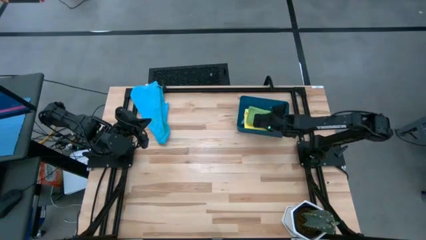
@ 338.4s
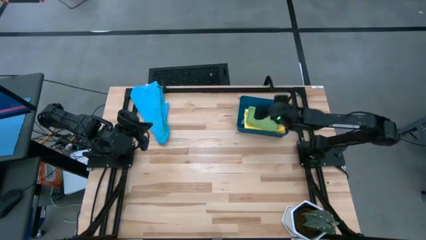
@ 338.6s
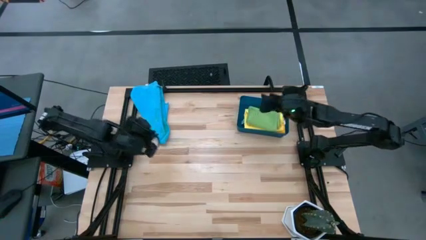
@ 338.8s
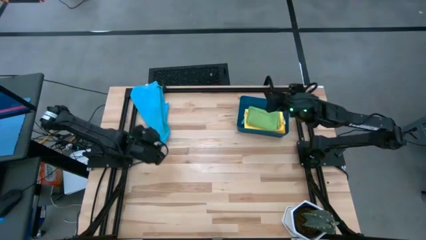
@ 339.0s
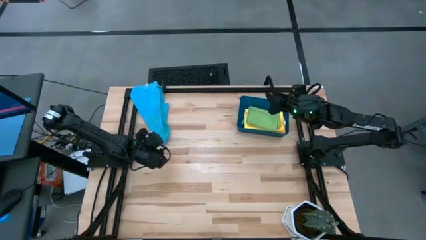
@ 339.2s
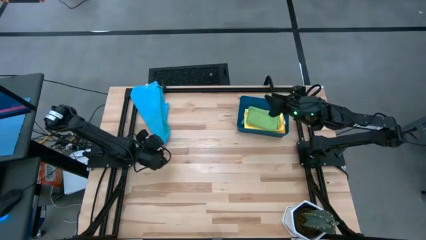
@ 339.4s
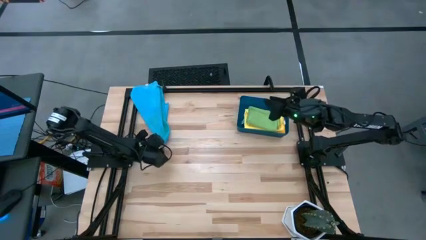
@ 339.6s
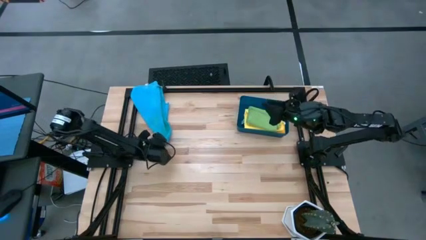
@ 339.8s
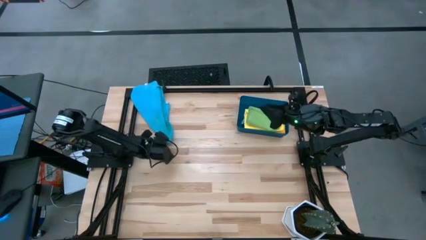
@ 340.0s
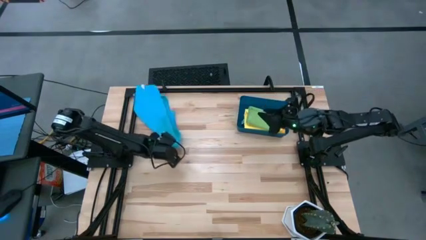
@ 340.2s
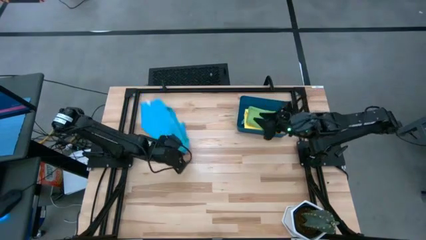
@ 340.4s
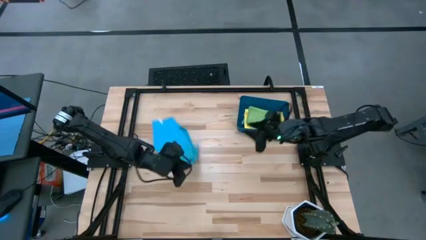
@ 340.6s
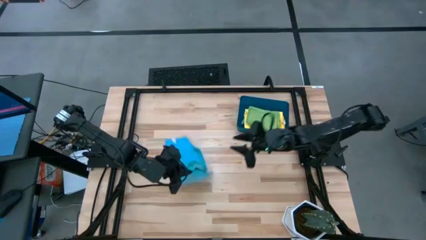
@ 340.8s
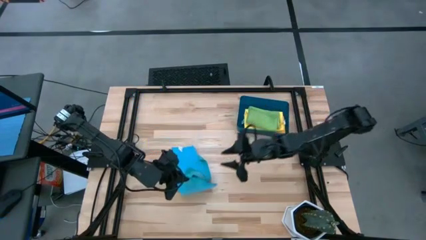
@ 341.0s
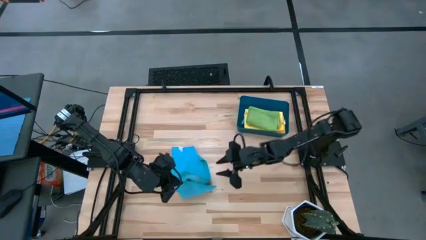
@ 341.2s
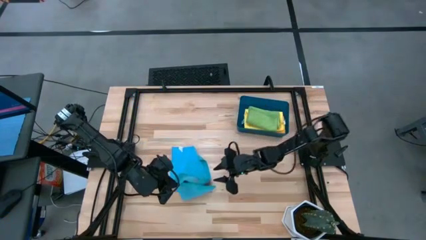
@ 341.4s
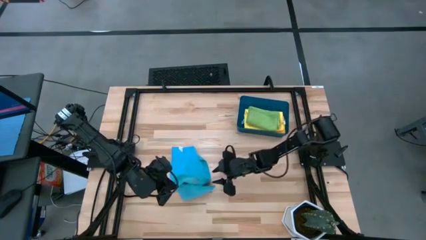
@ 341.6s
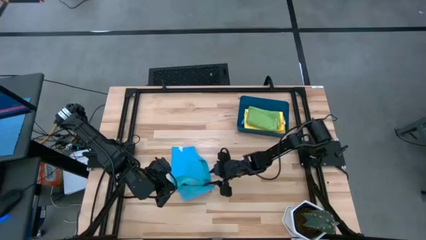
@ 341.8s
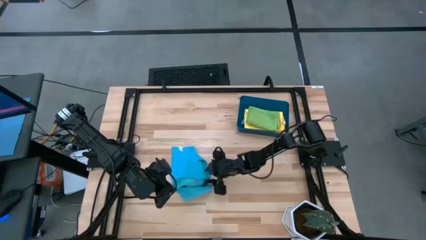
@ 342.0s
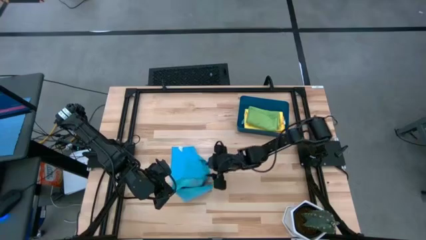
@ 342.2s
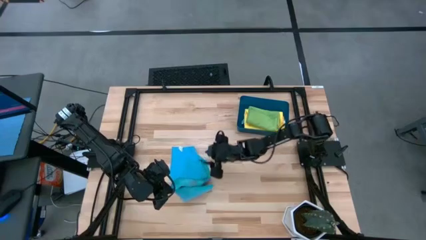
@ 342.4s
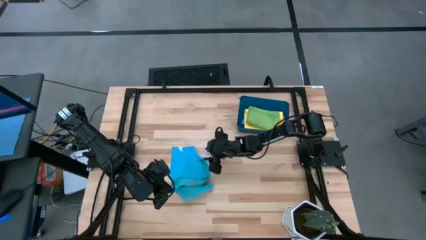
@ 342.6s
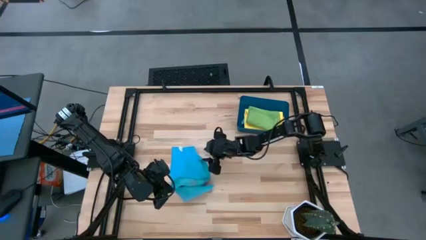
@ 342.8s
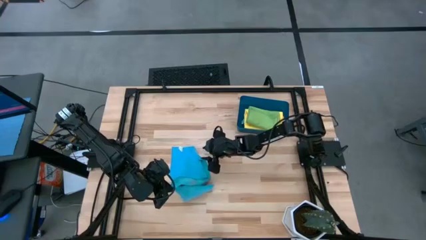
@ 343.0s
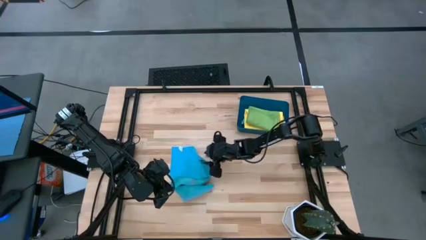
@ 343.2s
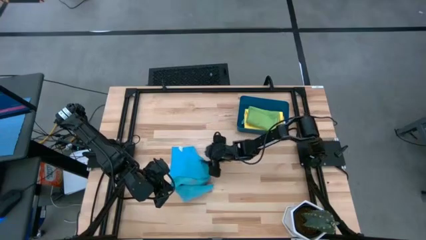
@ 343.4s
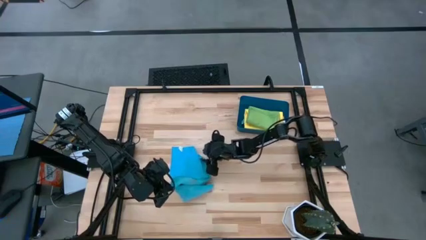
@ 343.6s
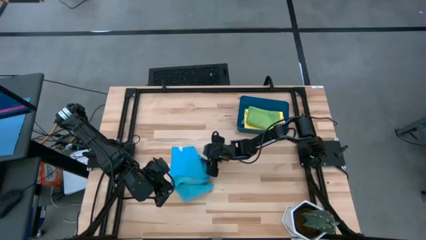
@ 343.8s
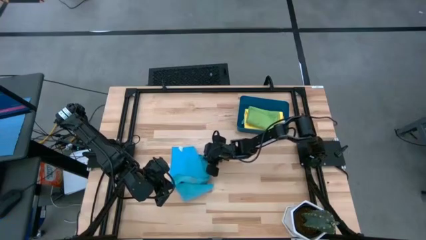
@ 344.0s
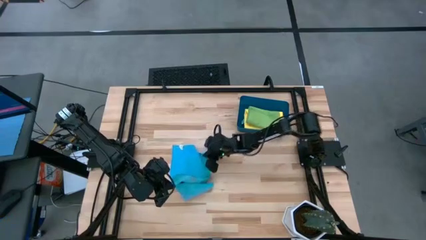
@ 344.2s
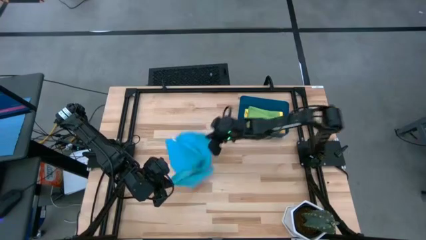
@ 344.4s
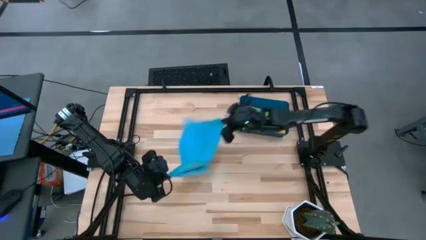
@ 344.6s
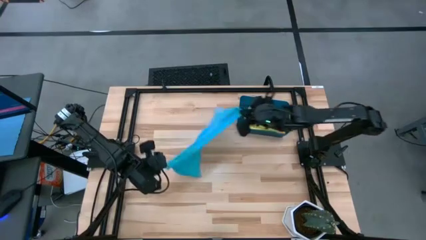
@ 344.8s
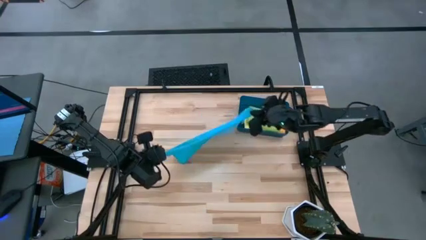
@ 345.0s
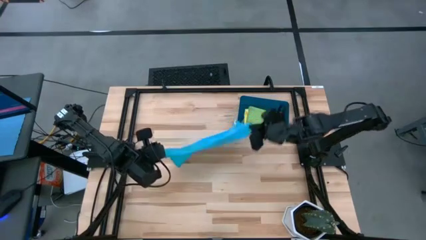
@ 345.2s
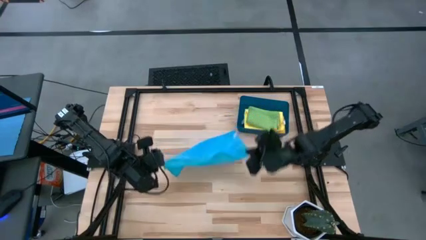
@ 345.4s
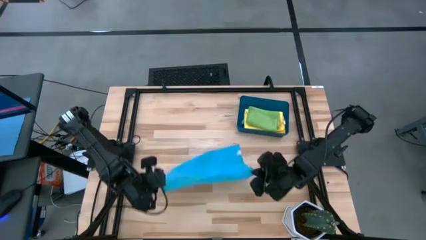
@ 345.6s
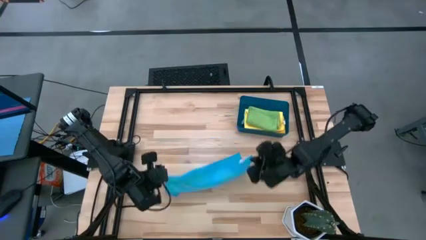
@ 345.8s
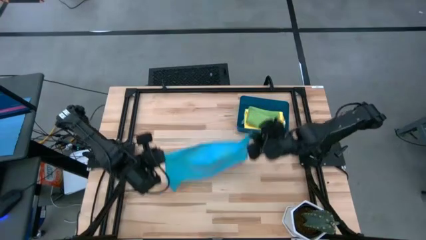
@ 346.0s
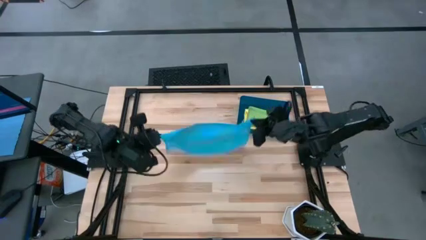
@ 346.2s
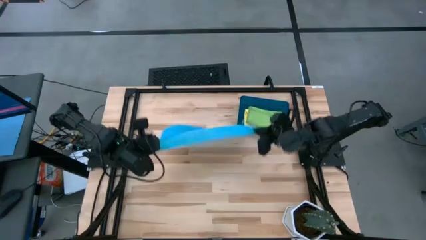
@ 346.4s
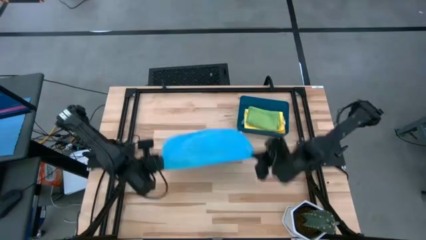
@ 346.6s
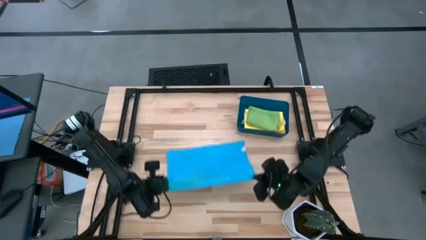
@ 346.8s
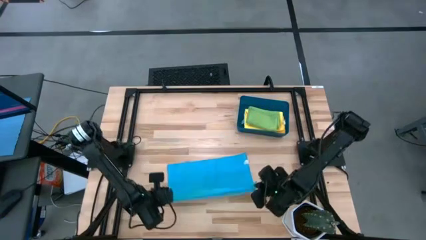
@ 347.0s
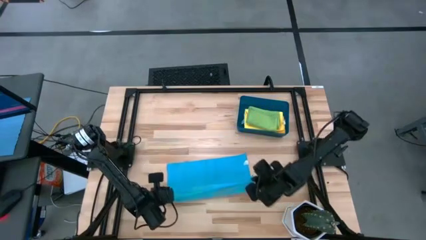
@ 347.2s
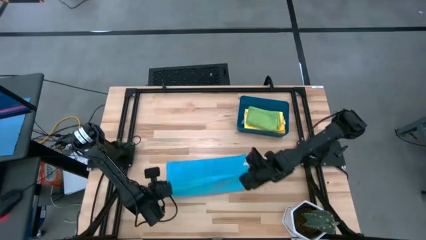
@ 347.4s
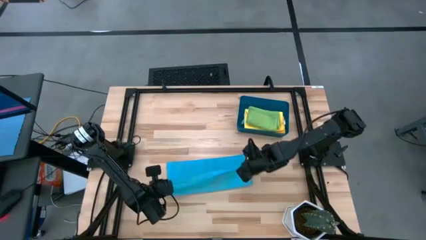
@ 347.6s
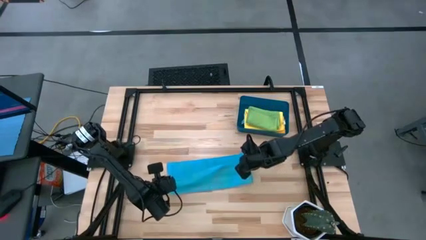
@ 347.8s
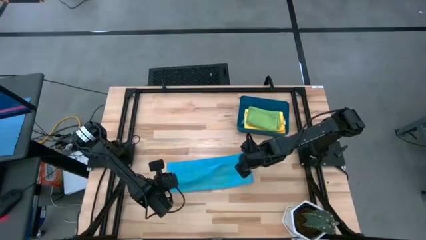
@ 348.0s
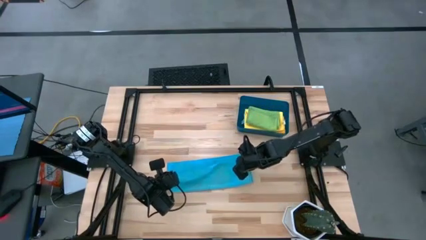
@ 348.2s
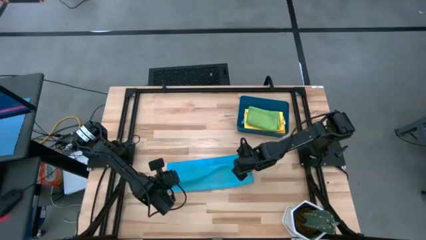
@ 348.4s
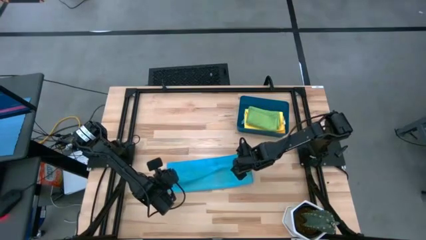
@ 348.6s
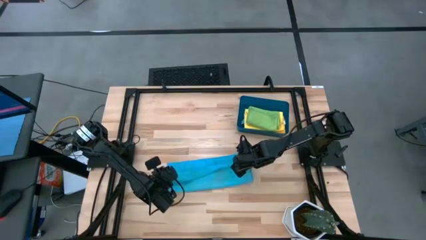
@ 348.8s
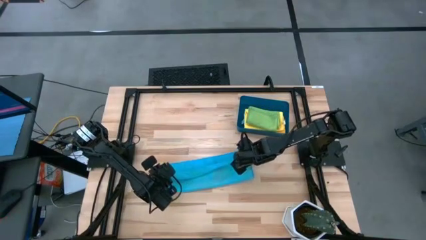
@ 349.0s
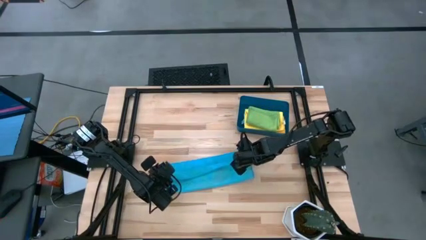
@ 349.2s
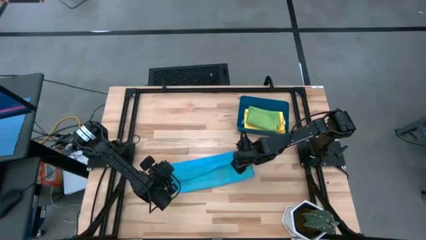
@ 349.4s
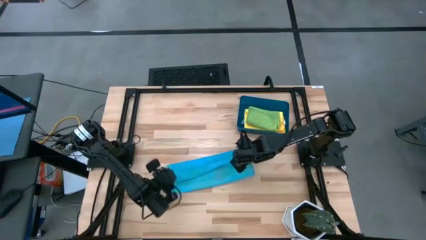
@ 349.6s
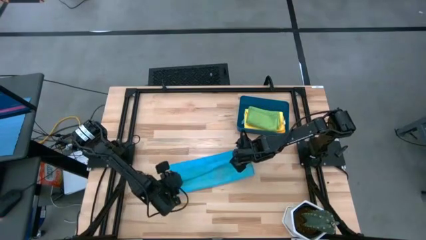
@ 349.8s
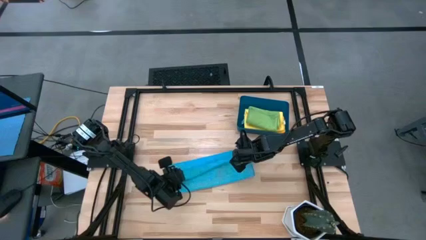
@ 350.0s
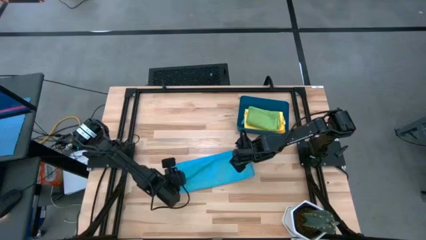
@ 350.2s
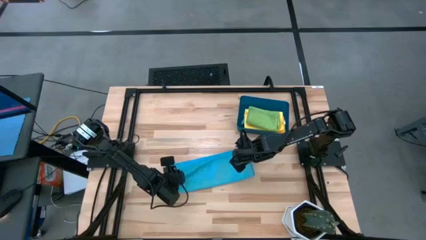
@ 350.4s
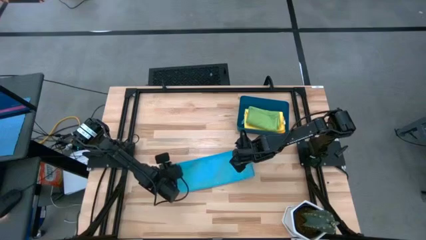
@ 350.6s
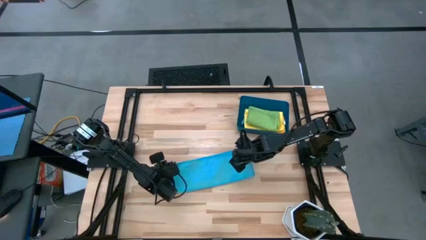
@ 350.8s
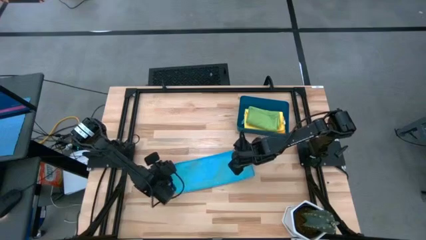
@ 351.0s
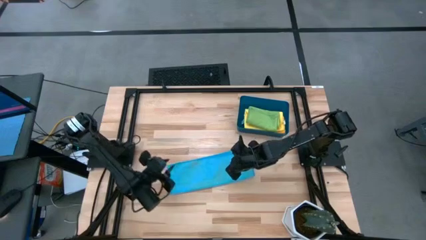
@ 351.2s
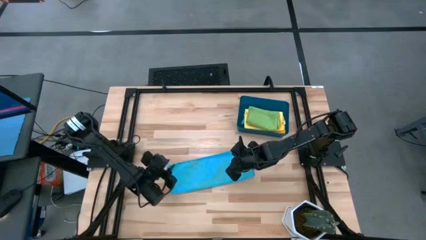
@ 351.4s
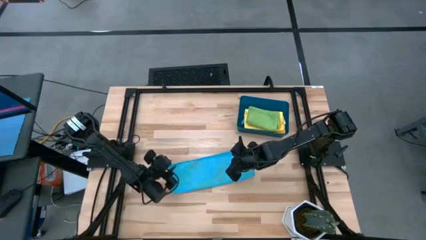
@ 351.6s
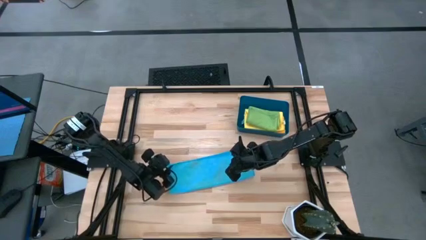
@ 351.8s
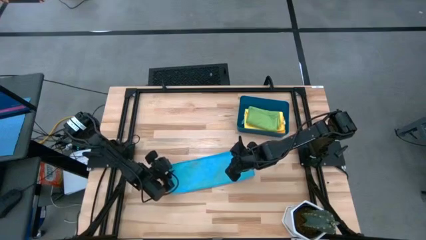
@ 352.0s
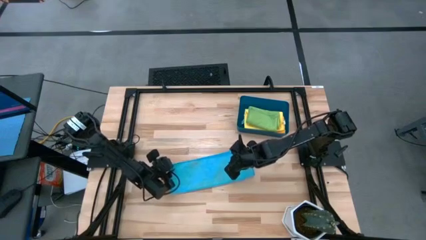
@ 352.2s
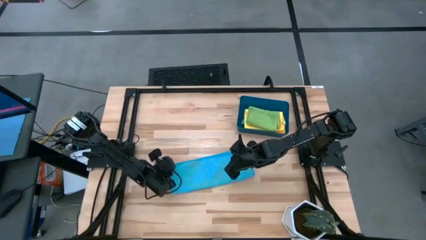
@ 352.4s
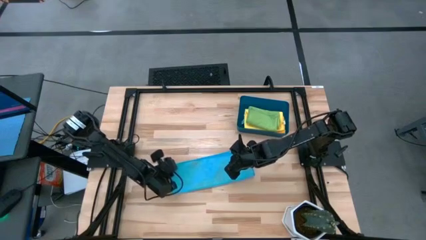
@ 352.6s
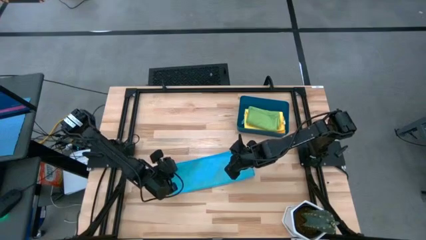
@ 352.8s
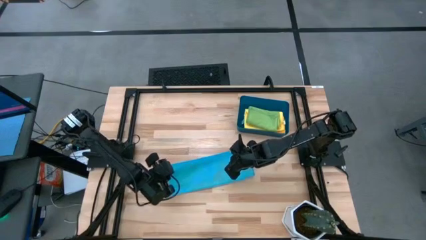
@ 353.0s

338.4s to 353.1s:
Task: Fold microfiber towels
Fold the blue microfiber cloth

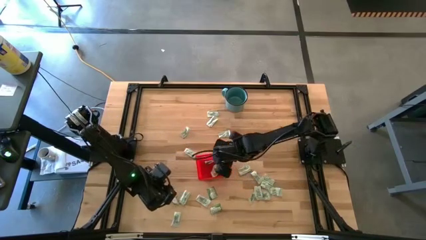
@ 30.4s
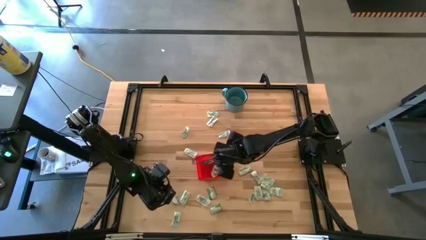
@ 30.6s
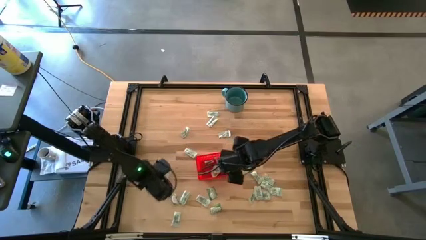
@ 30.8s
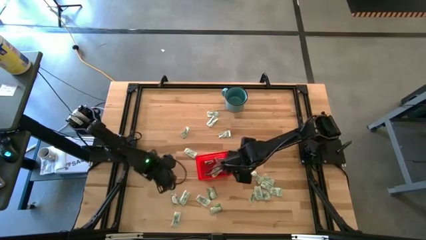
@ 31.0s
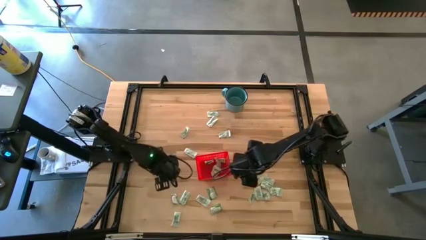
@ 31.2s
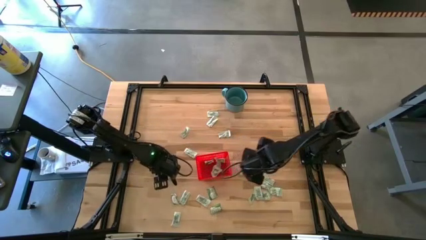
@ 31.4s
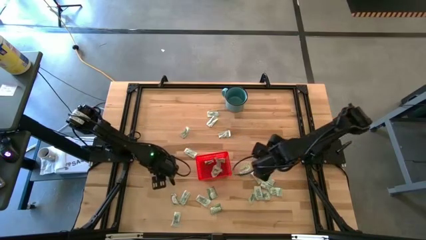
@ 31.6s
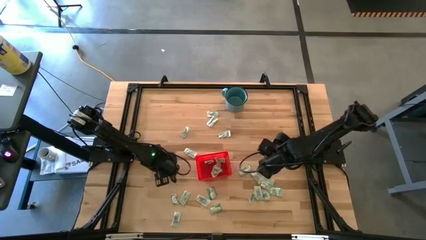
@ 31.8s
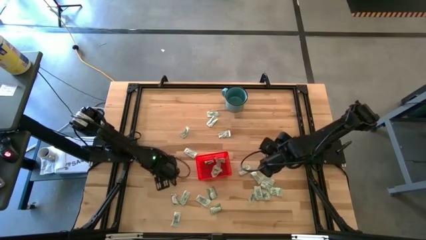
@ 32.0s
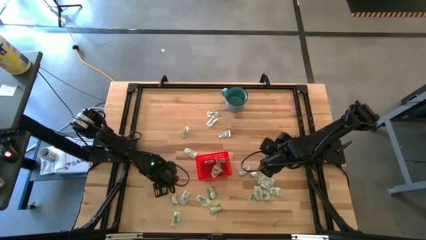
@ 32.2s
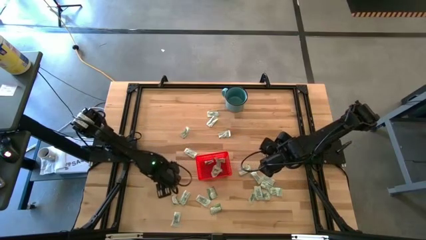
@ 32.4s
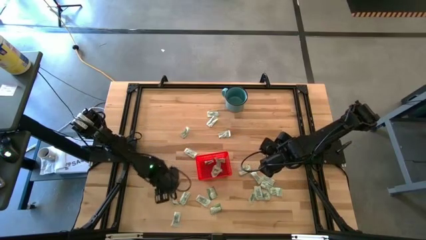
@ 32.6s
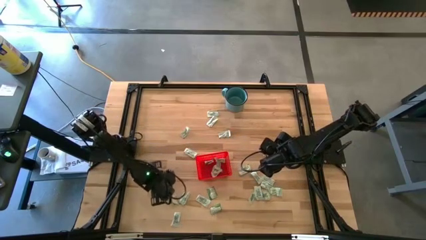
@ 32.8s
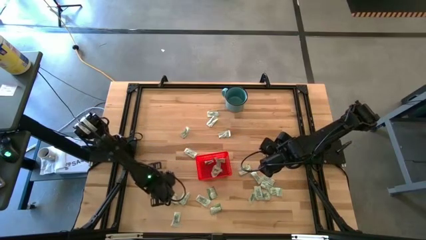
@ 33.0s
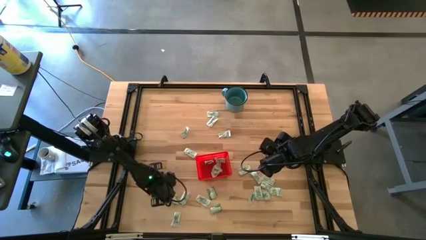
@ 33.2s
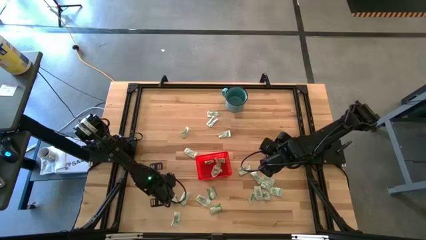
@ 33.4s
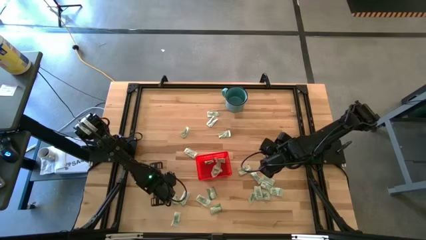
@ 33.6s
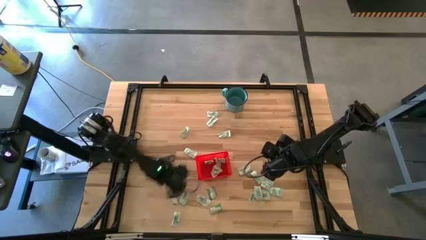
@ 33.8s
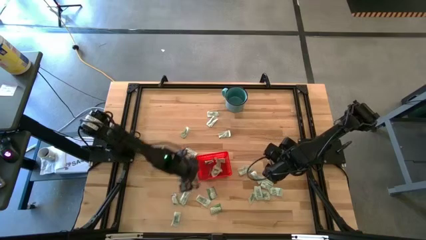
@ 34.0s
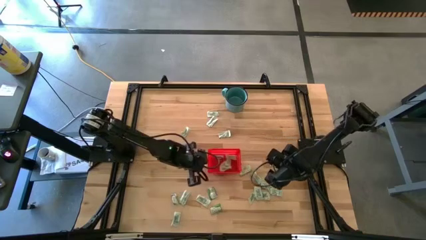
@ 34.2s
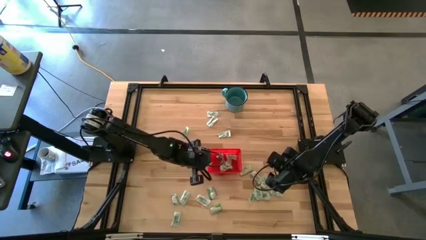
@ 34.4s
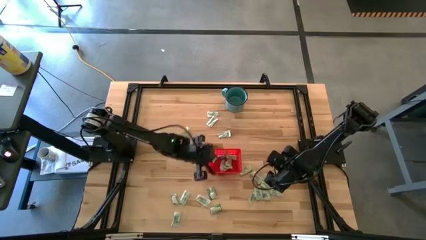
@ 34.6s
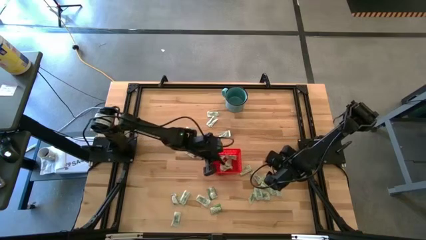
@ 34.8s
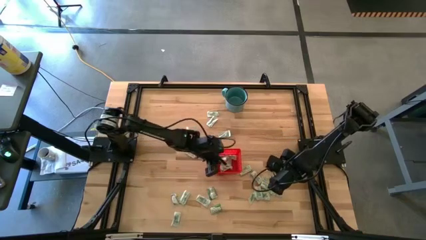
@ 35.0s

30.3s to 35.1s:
Task: Pick and place Stevia / Truvia into bins
Put the green stevia packet into the red bin
